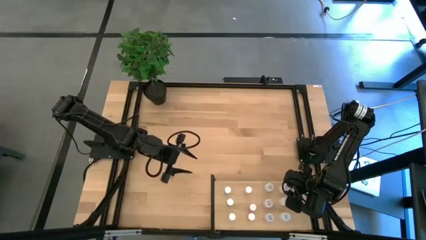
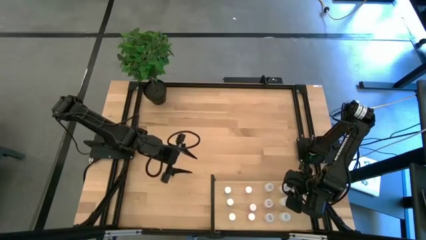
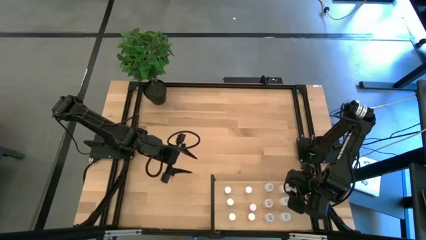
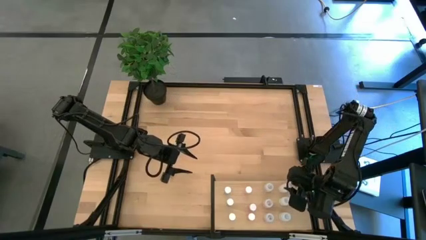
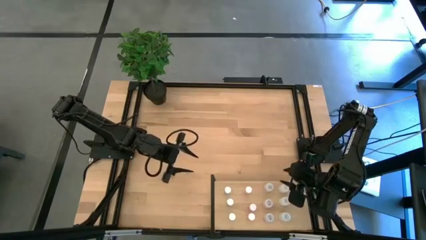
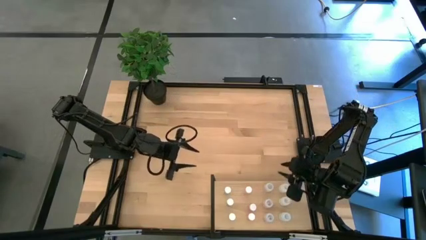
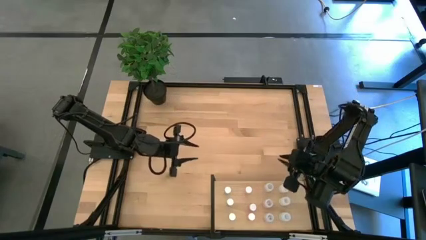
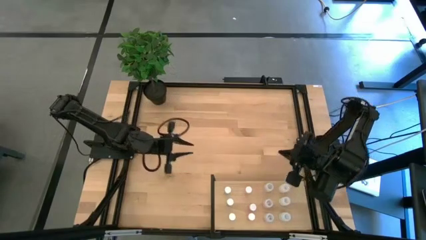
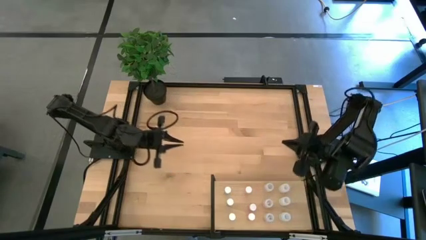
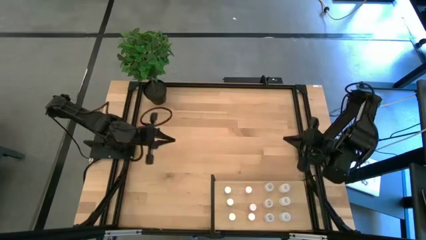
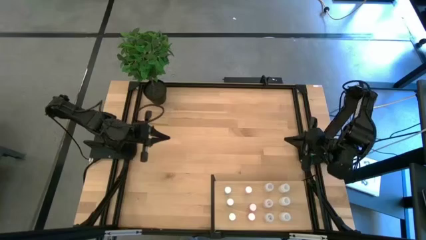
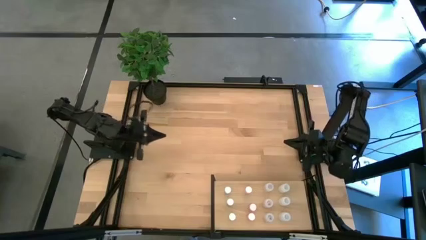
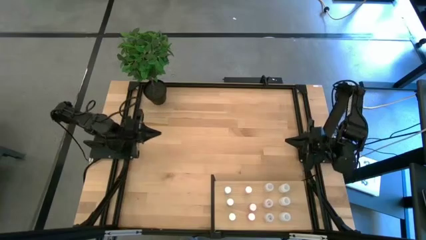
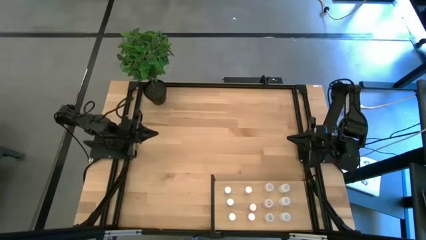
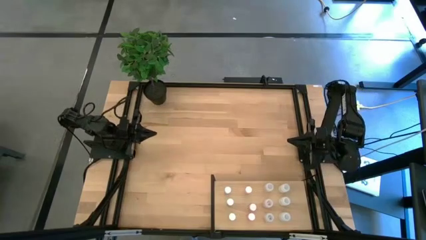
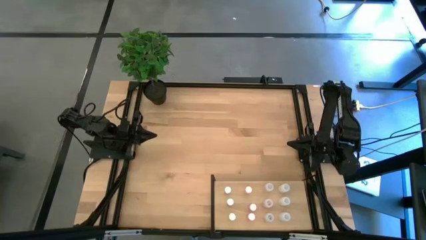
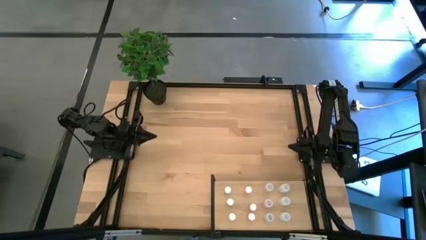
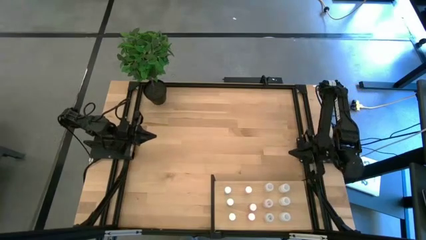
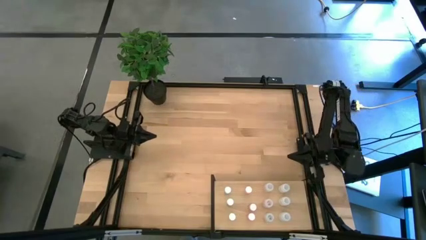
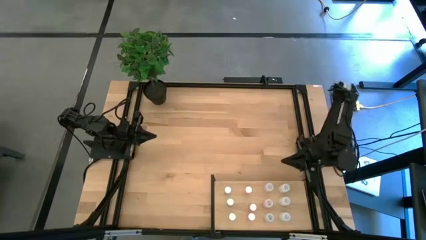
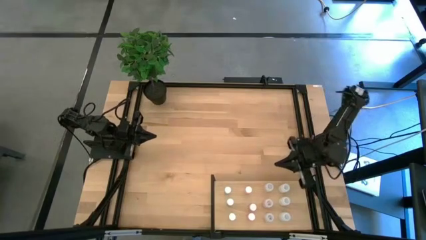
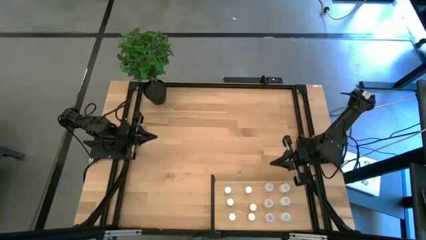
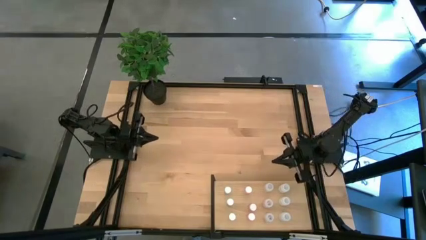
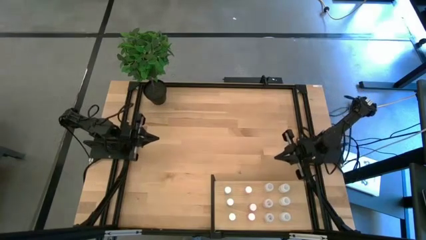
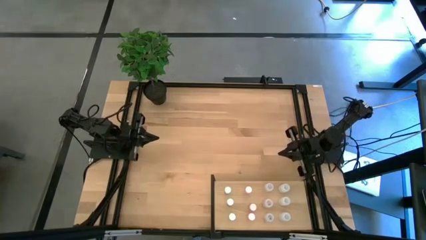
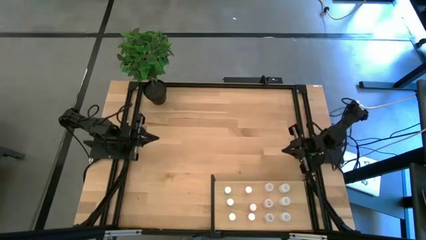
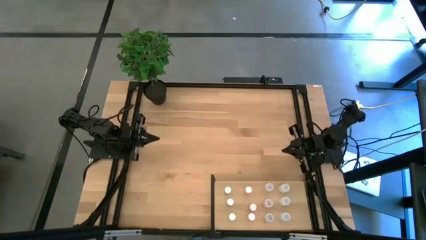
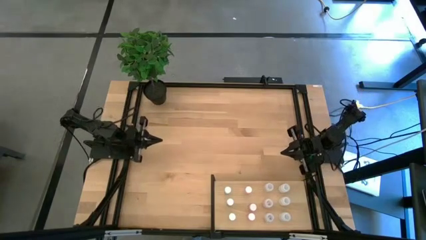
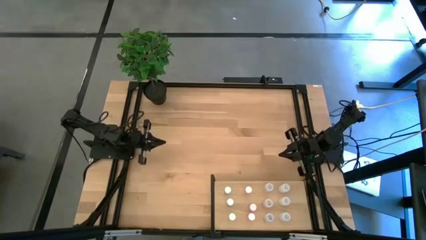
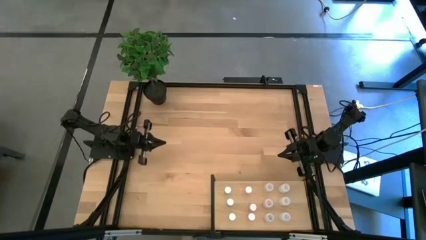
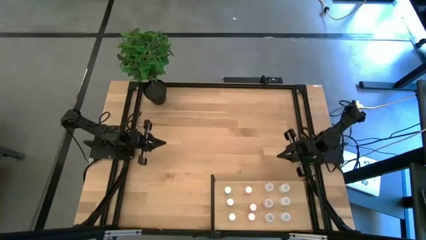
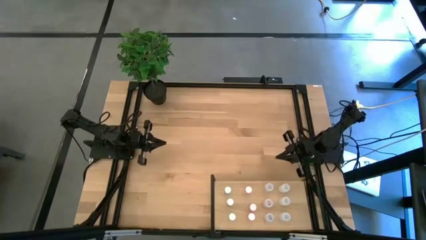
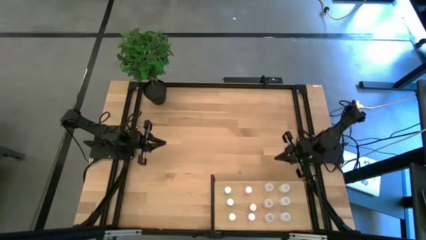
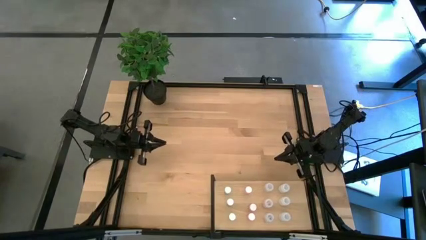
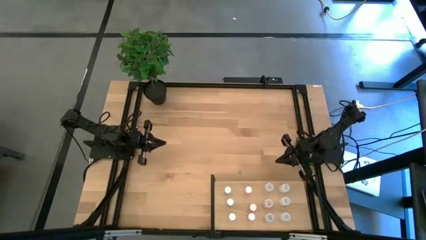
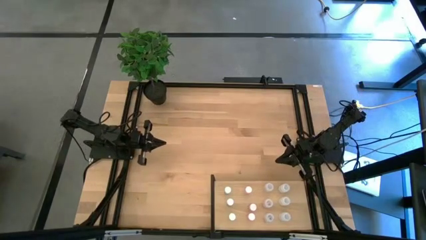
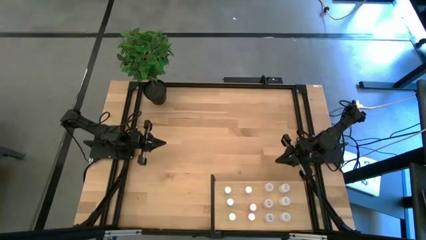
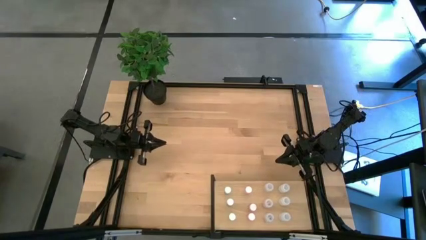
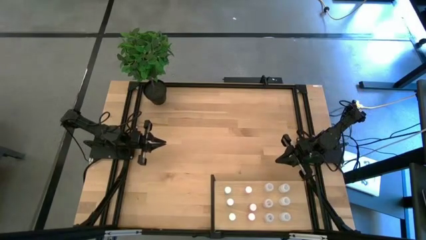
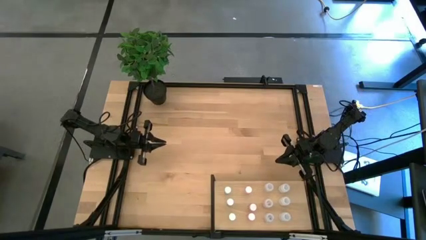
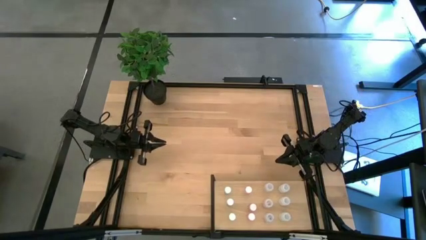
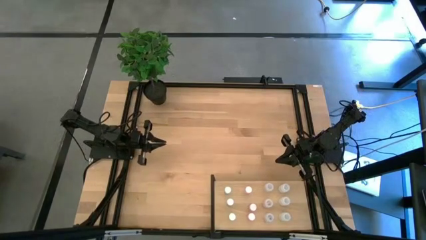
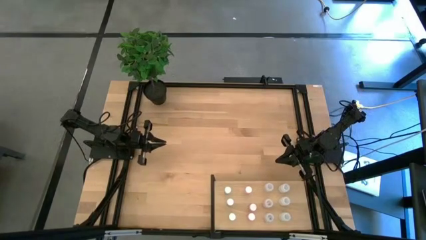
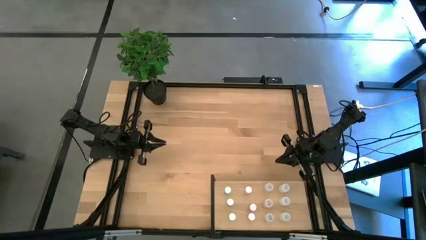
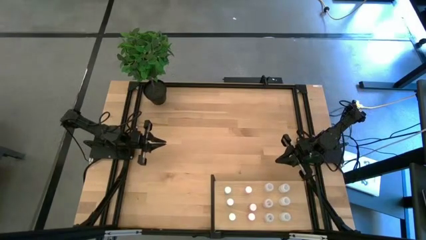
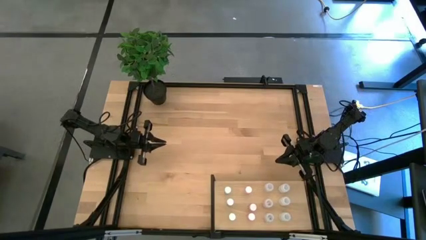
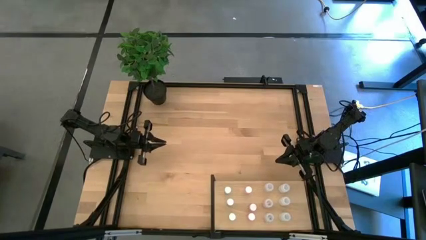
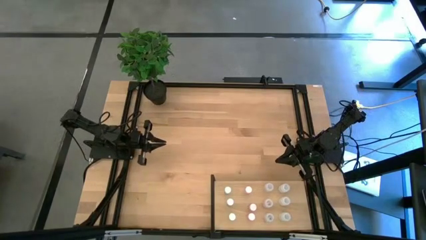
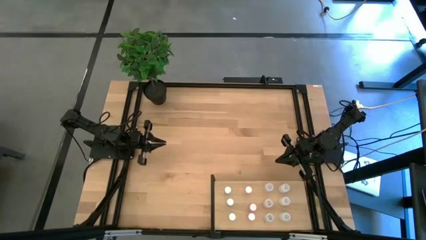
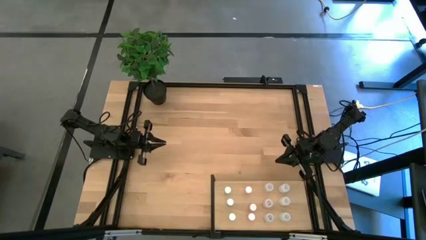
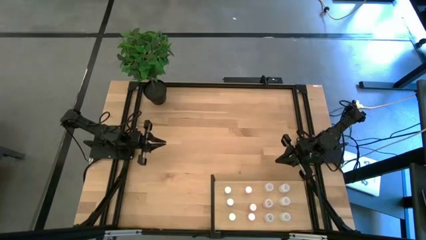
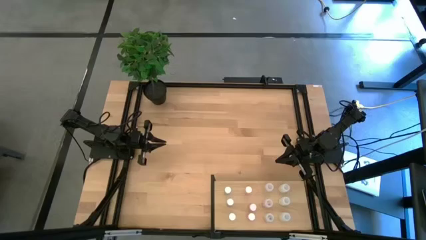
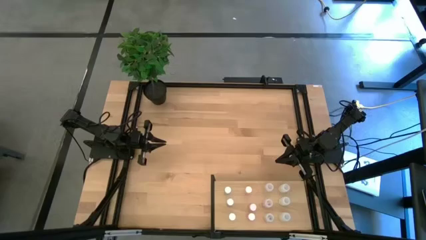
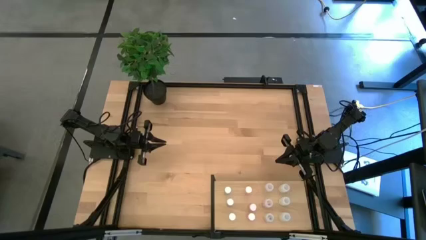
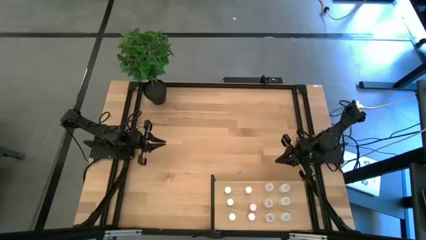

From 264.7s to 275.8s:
Task: Pick and place medicine bottles onto shelf by color
Return to Home Position
